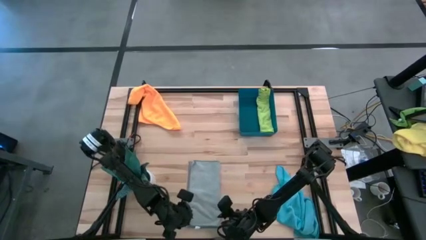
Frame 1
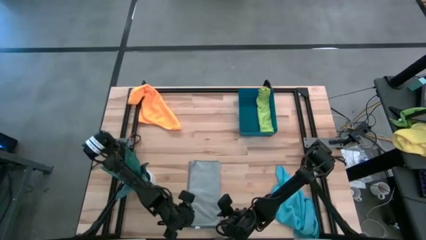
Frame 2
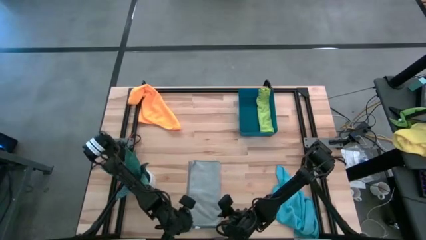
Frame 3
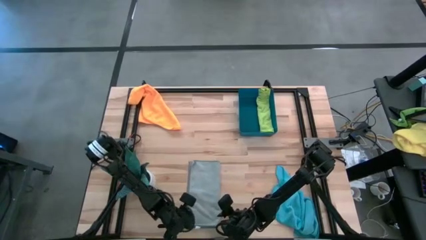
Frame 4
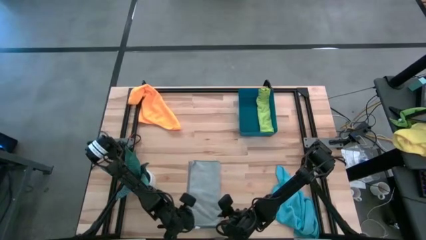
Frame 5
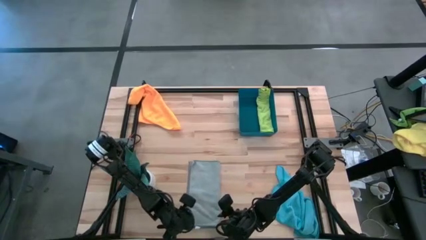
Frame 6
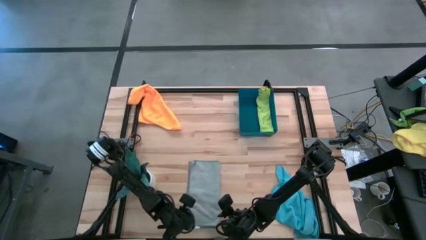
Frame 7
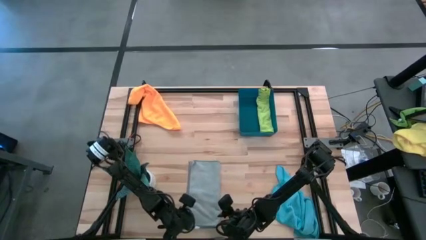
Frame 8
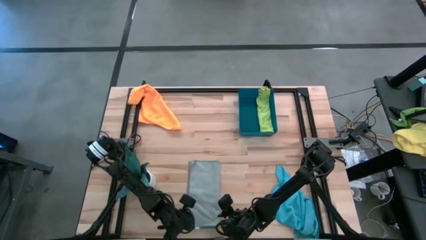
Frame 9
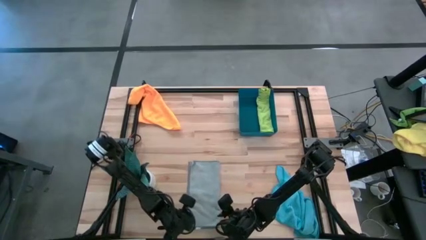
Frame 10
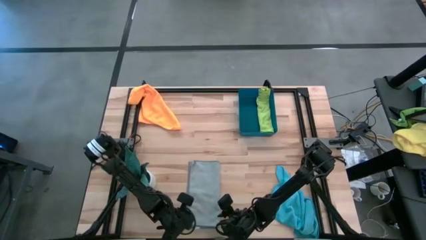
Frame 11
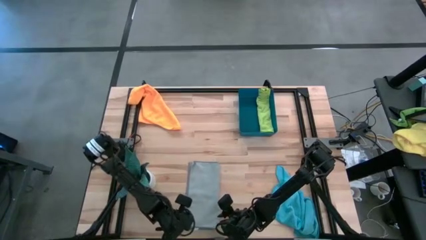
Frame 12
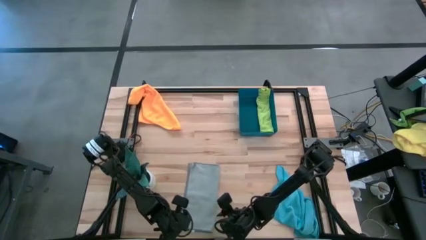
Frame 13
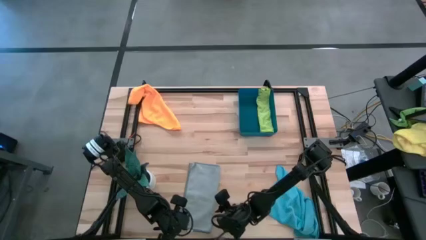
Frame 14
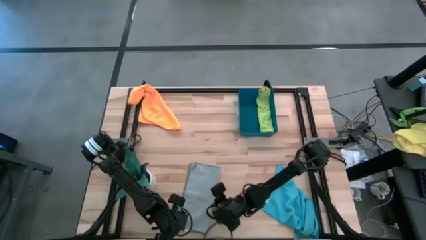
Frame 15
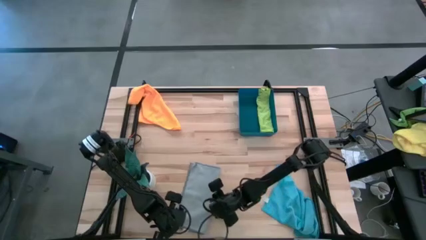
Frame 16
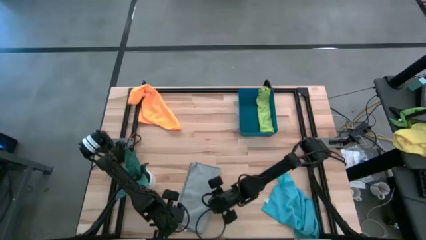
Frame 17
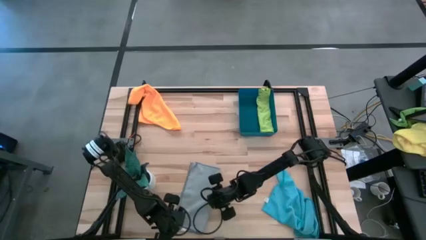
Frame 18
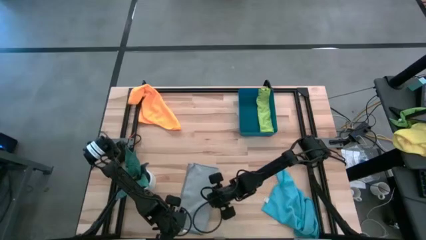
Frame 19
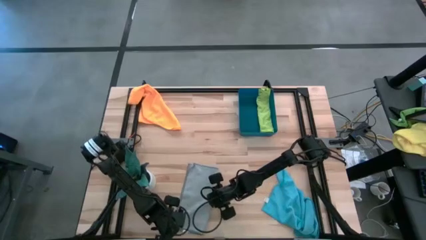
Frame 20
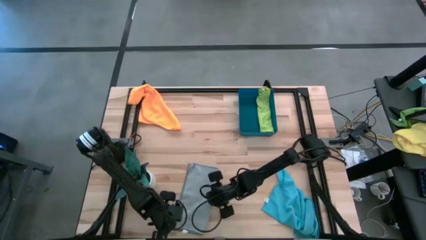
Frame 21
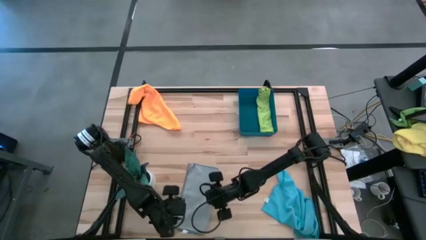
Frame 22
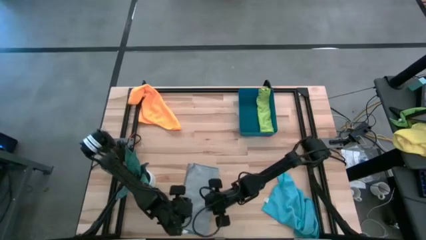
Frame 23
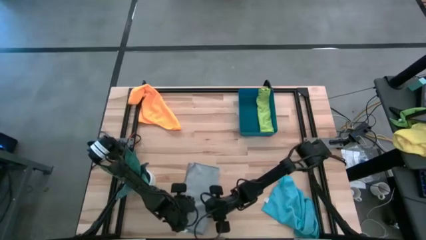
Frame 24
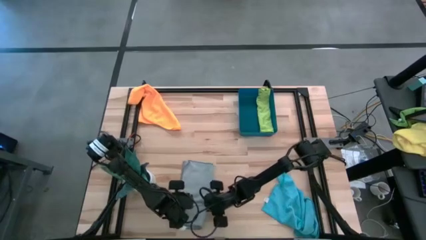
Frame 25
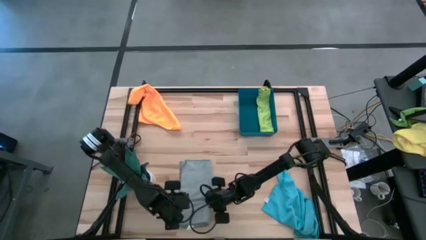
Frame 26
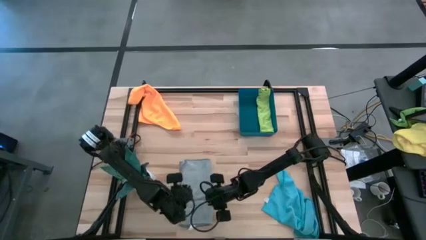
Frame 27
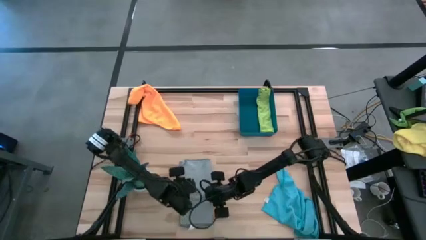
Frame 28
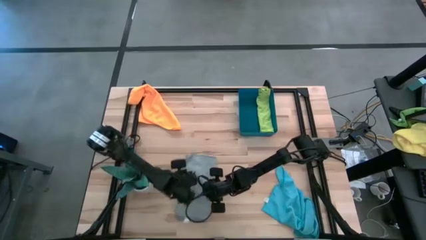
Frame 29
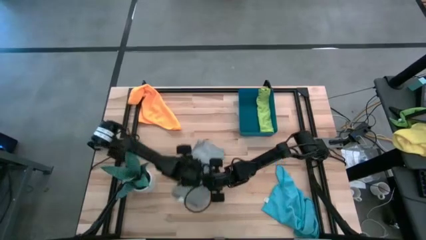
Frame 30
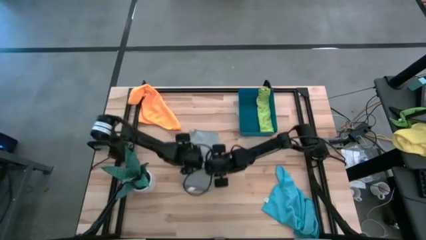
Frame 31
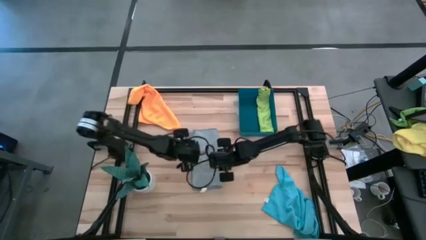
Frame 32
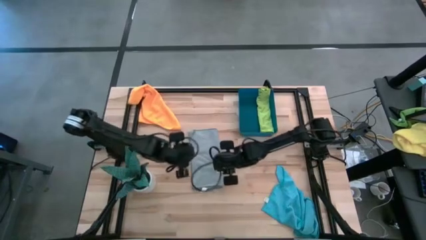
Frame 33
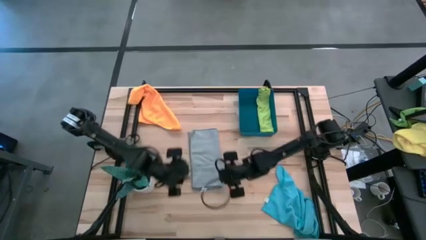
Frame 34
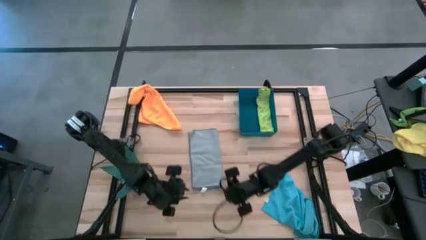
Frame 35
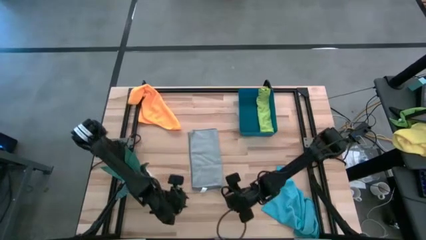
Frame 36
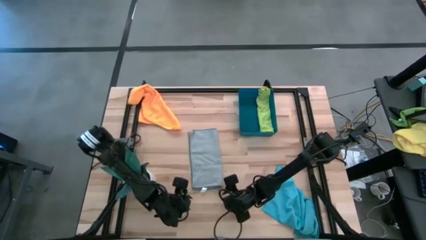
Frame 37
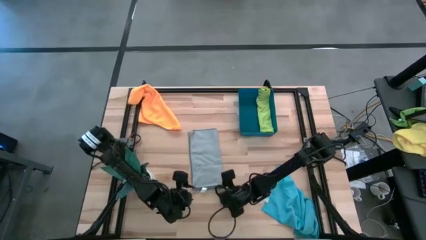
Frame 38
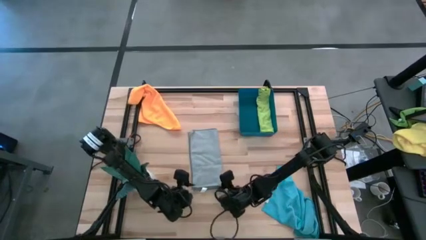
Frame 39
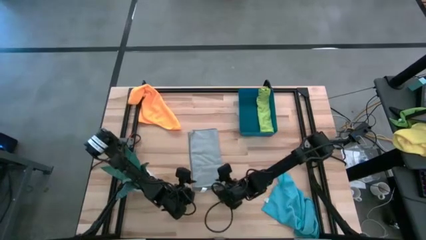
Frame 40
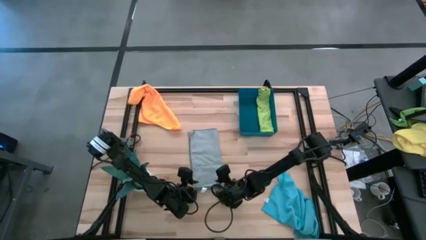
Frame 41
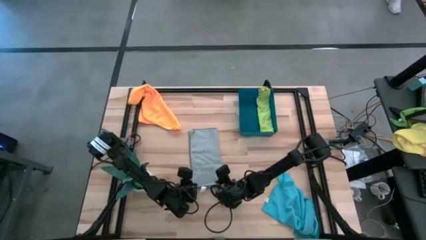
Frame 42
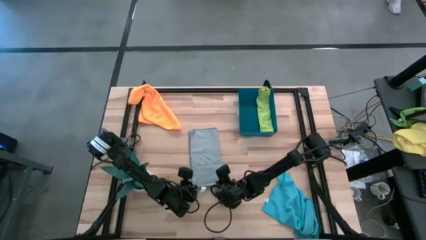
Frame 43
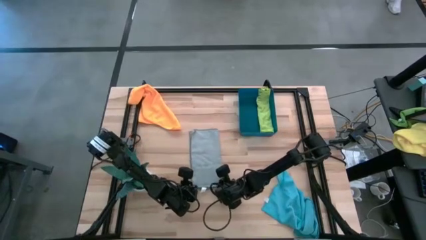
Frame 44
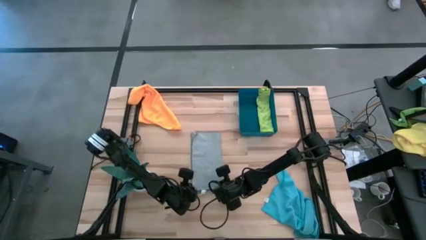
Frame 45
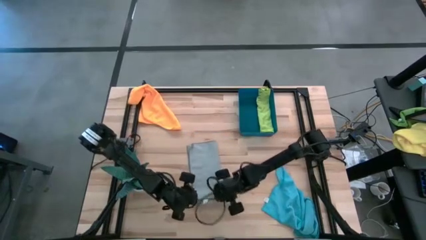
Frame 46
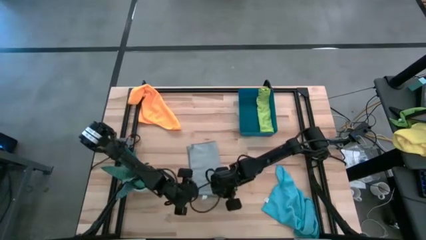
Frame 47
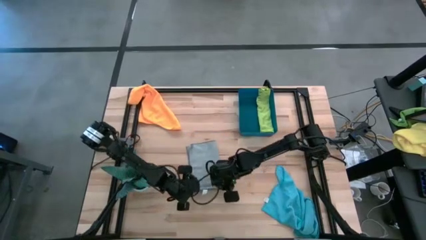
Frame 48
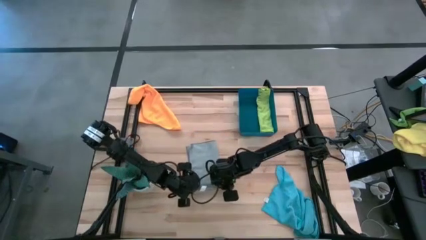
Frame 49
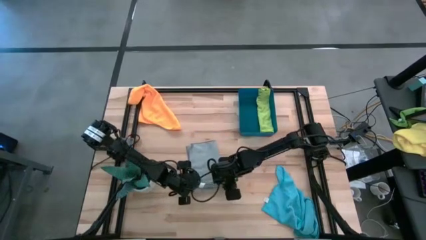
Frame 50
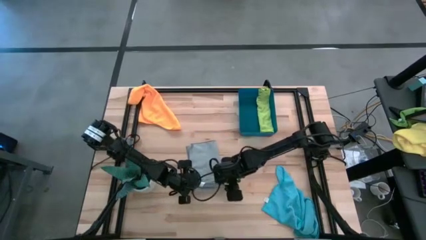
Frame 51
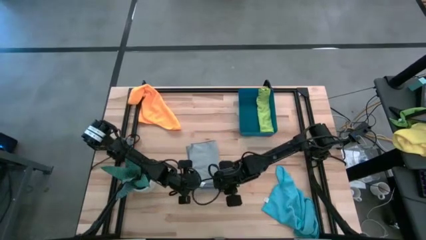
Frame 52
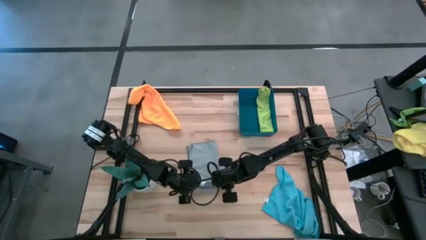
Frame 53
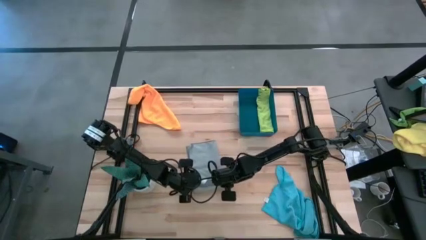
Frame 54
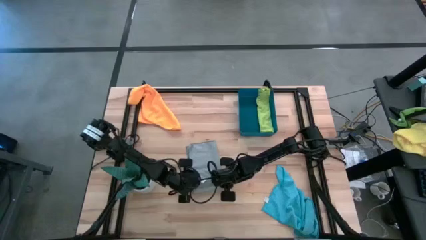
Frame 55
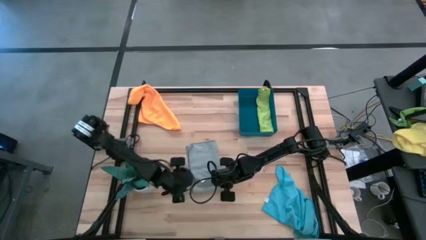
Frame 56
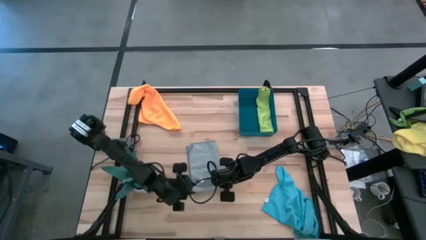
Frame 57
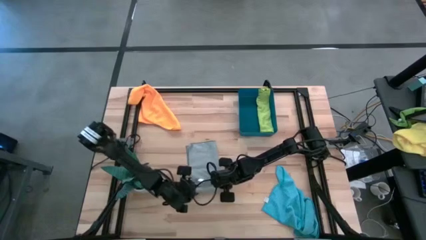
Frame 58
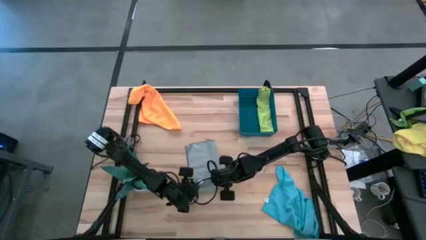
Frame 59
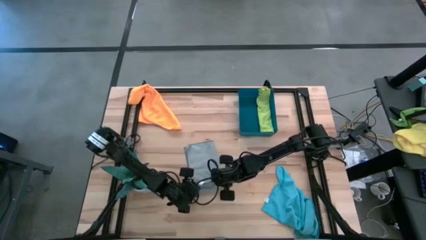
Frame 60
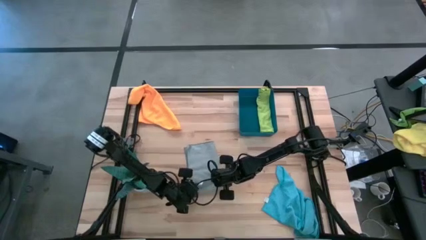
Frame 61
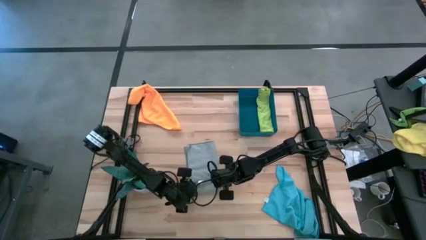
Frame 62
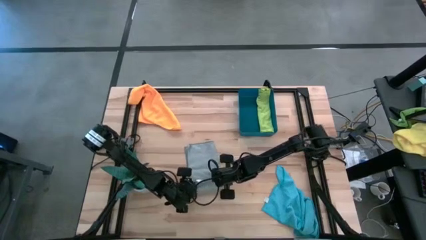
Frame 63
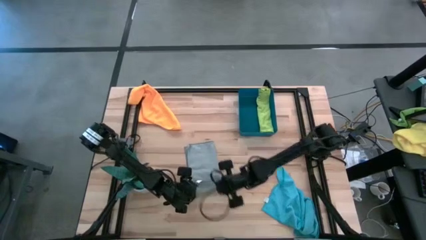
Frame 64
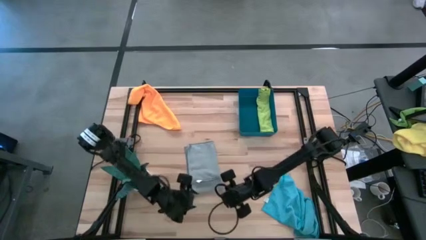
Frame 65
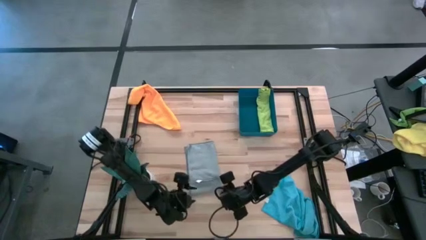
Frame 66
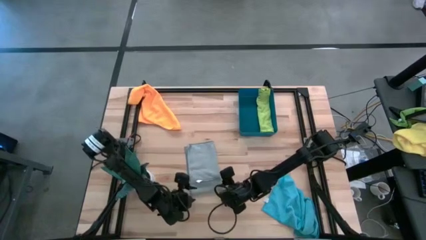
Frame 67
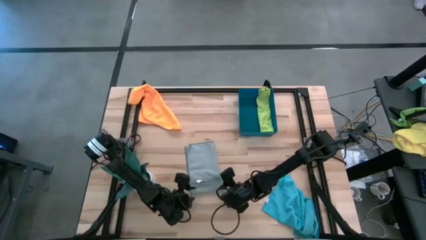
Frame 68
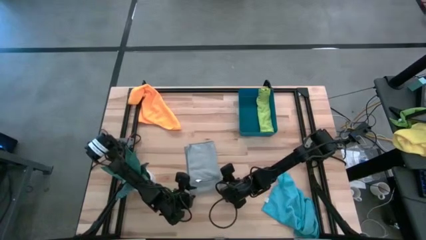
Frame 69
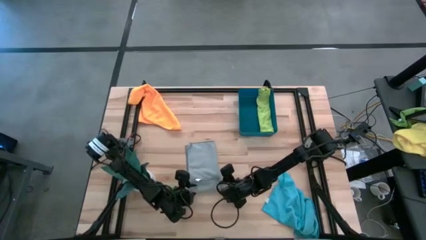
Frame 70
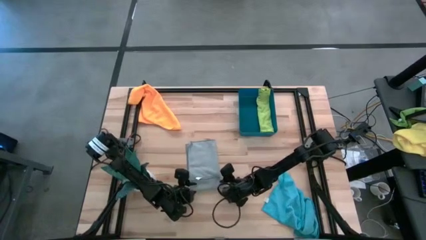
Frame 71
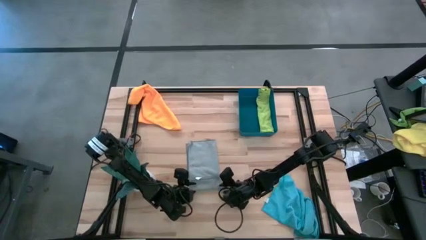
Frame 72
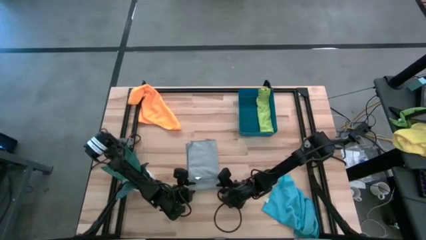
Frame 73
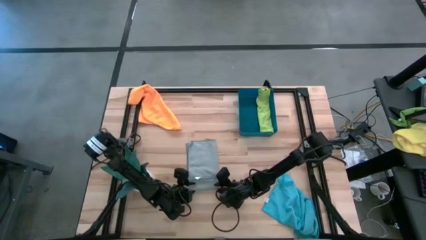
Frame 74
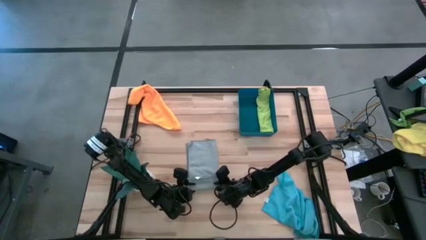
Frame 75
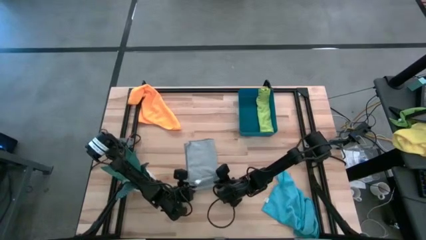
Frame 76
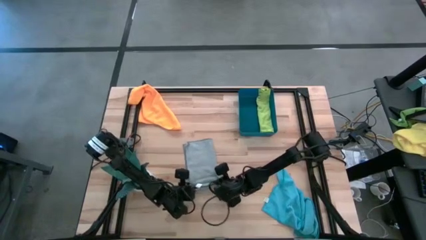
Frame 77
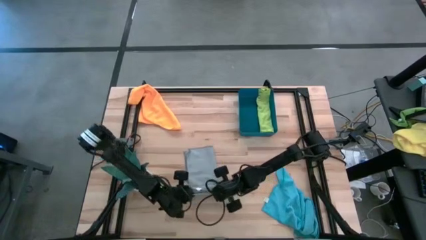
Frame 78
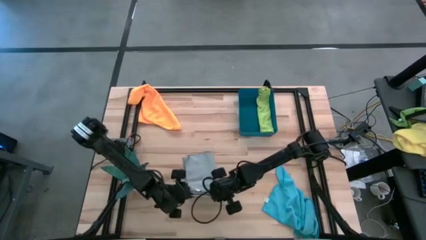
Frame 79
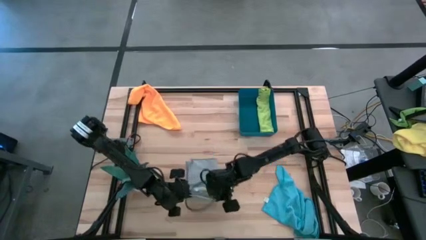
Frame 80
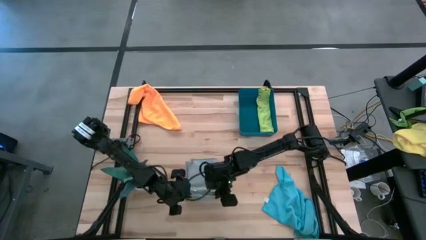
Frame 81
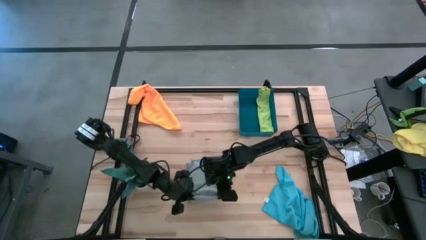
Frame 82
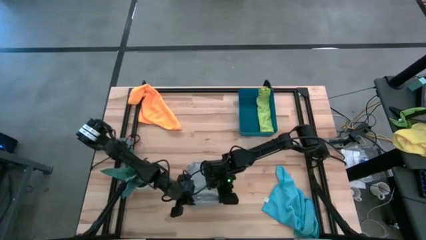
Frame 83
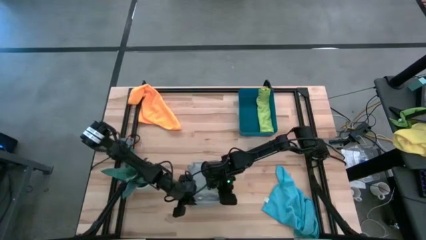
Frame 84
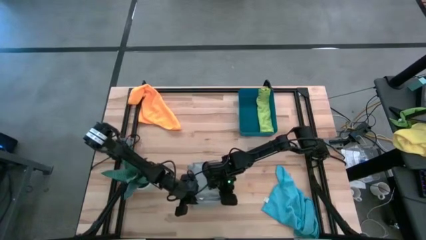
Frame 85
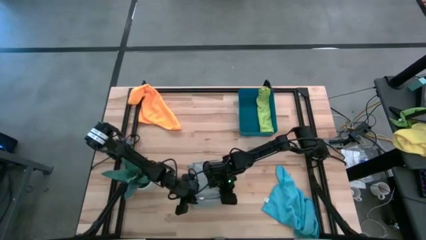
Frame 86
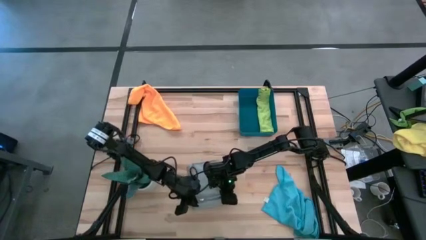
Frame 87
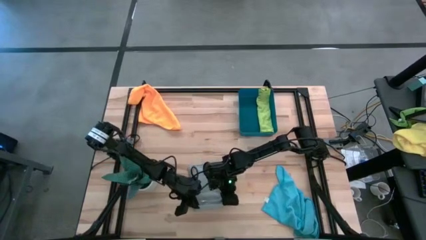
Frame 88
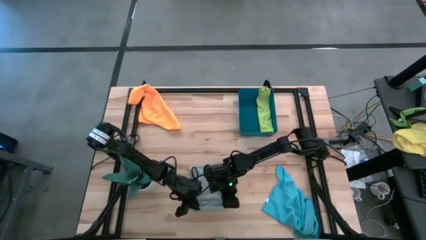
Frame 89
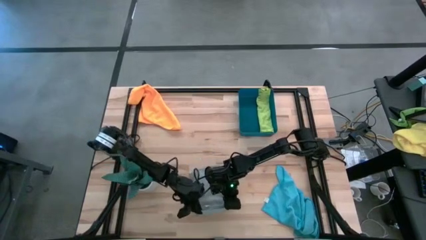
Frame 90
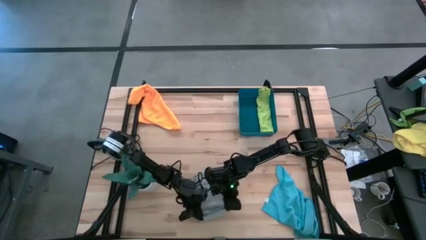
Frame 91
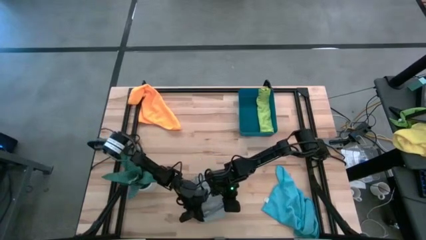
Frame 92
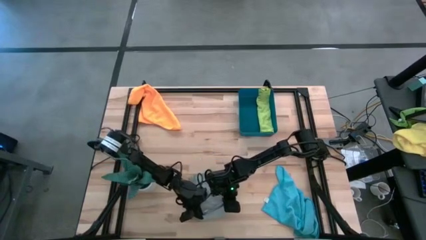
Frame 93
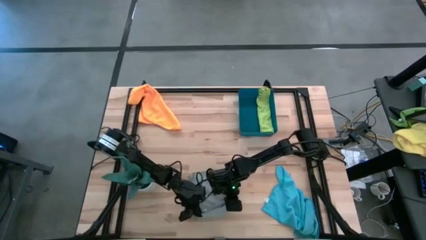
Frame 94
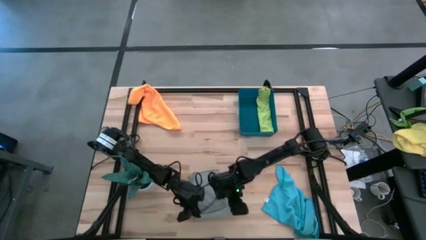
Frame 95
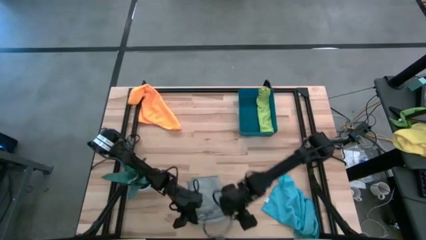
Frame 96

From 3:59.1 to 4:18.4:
Task: Roll microfiber towels into tight, uniform cylinder then place into a basket
Roll the gray towel
